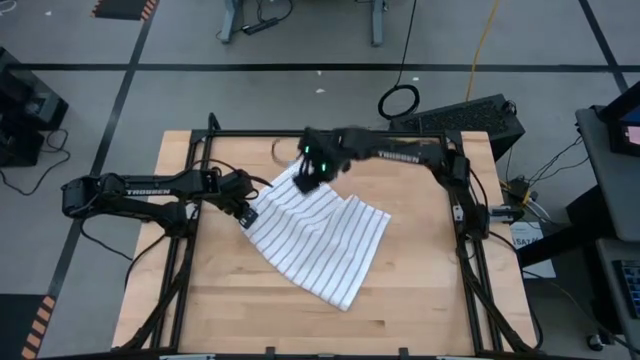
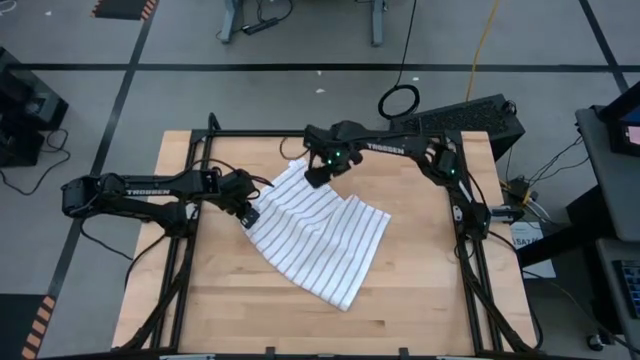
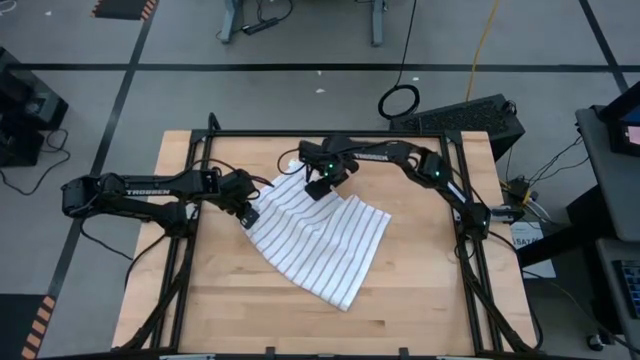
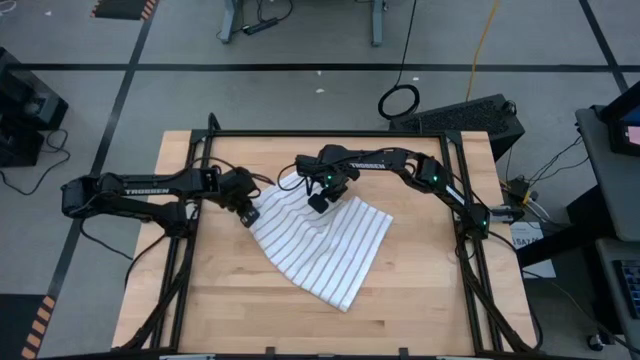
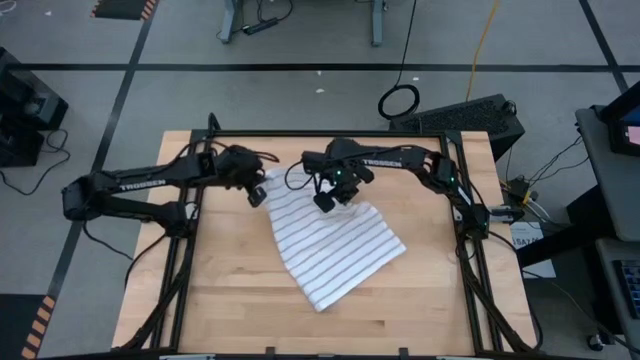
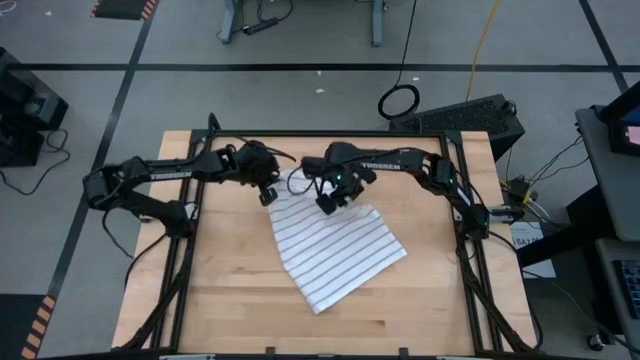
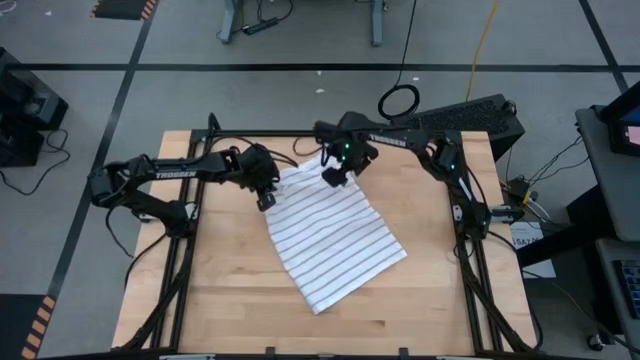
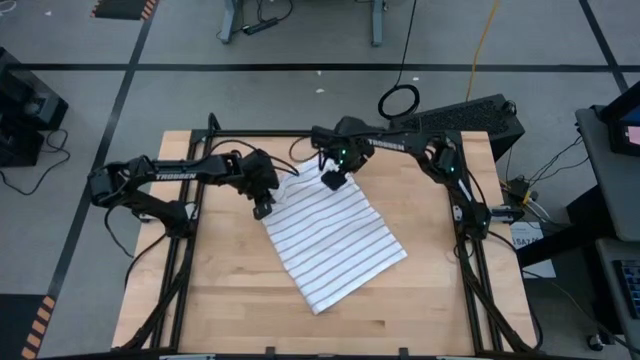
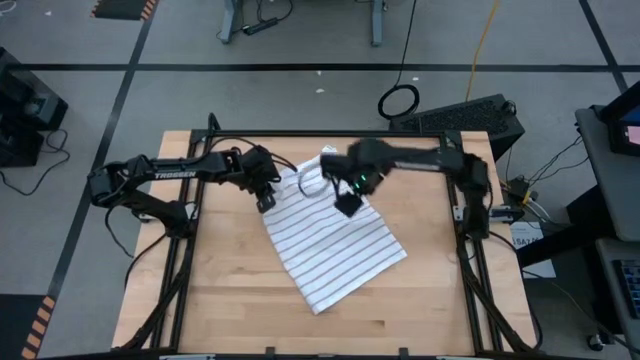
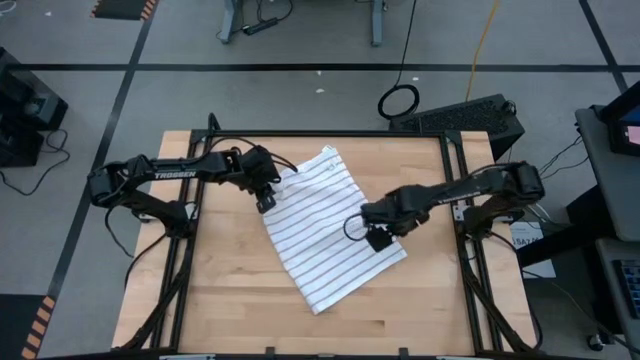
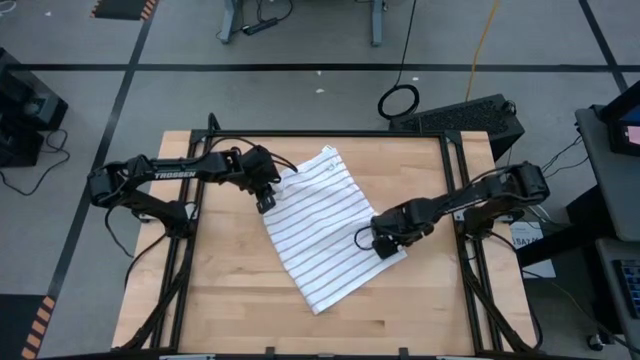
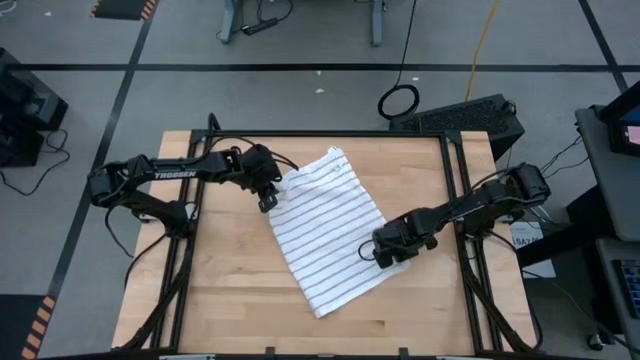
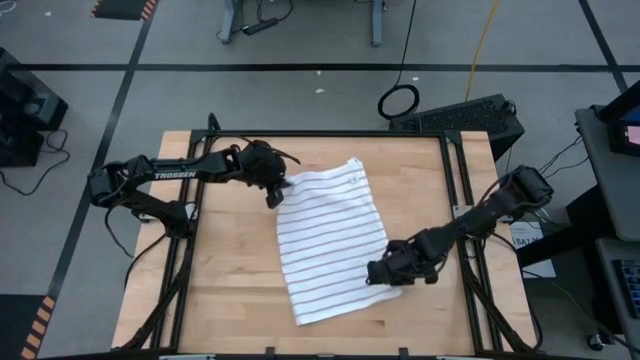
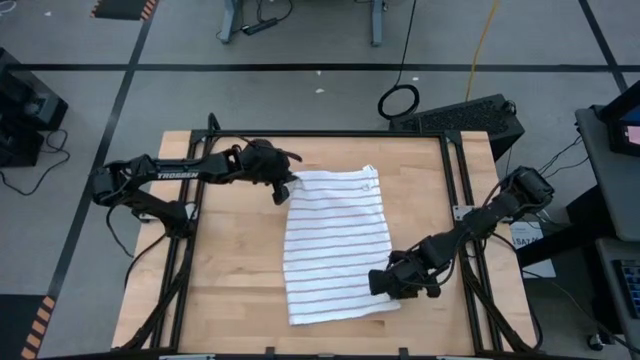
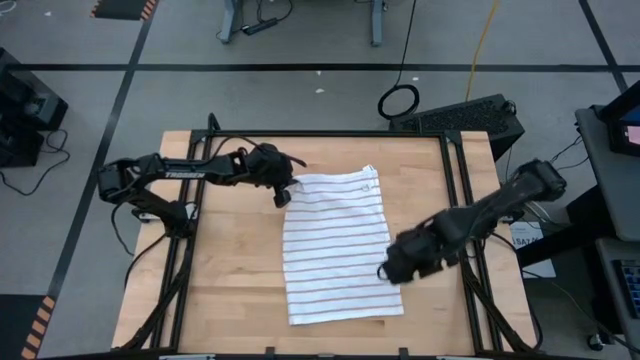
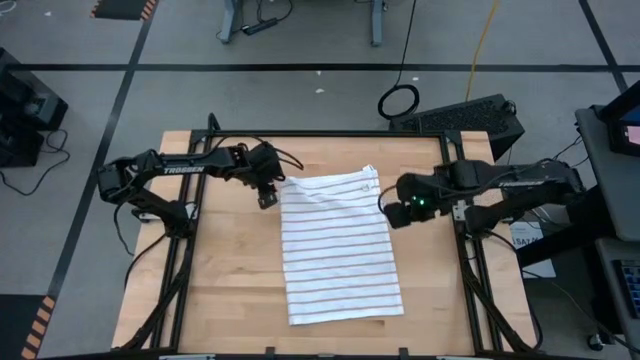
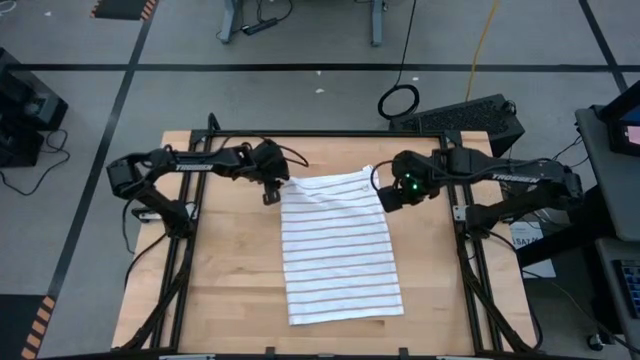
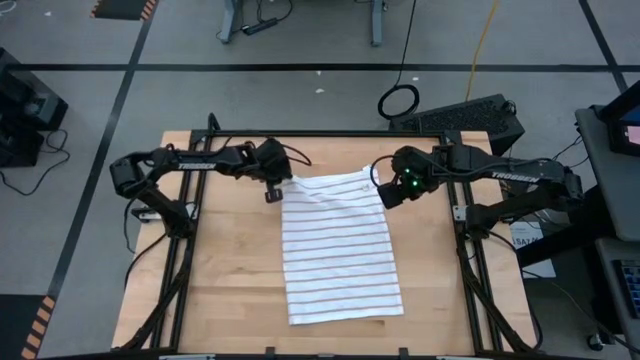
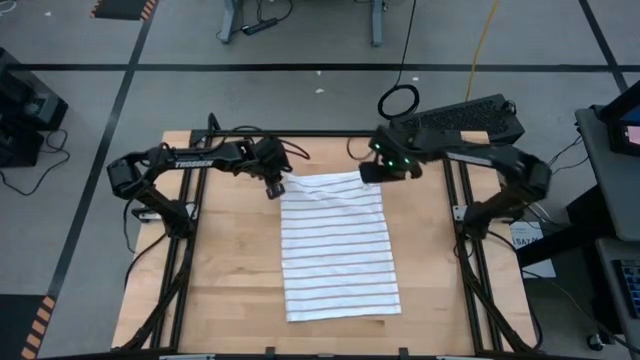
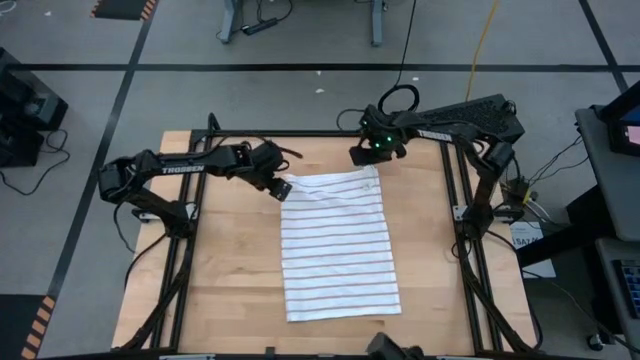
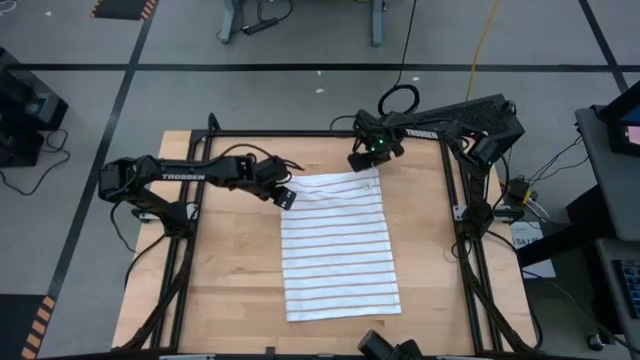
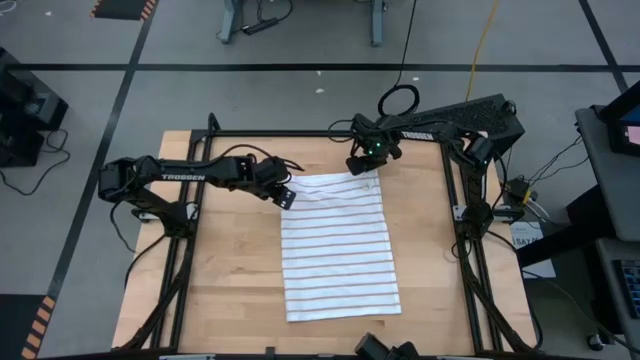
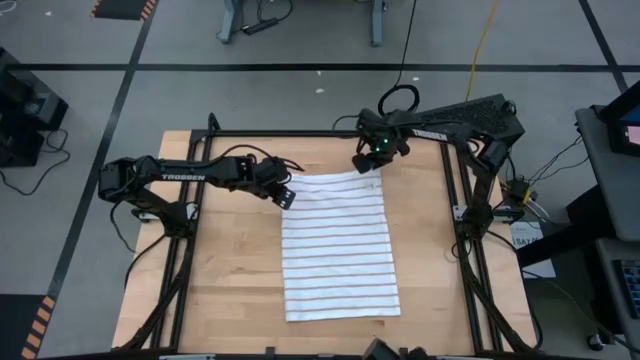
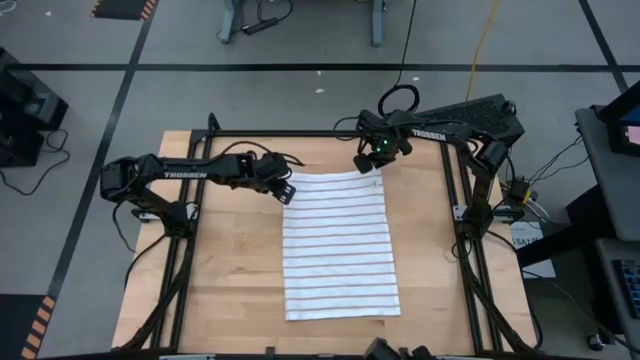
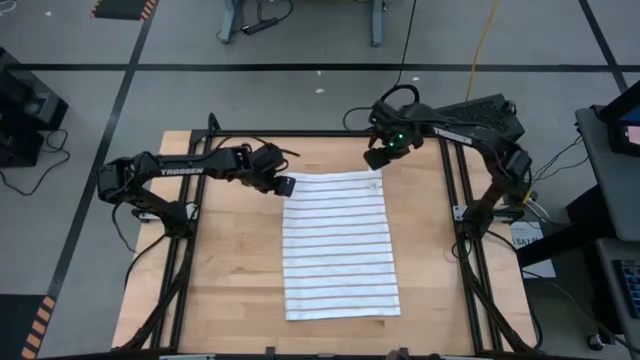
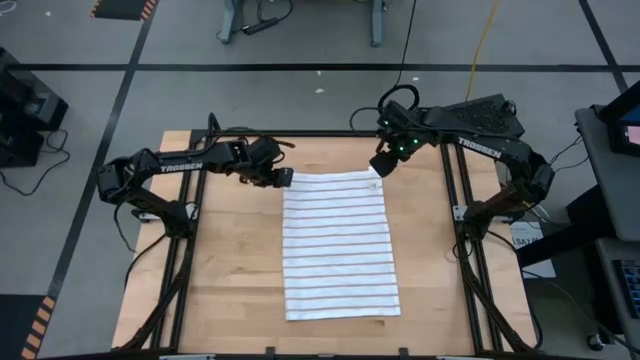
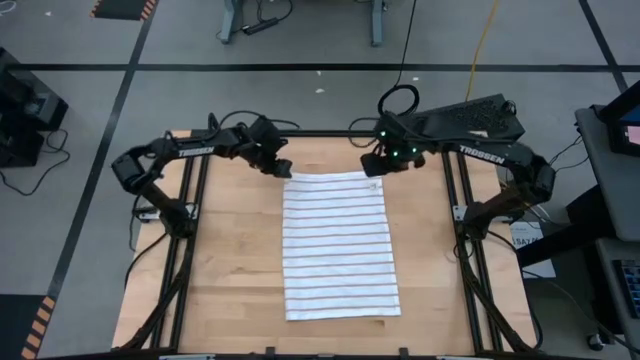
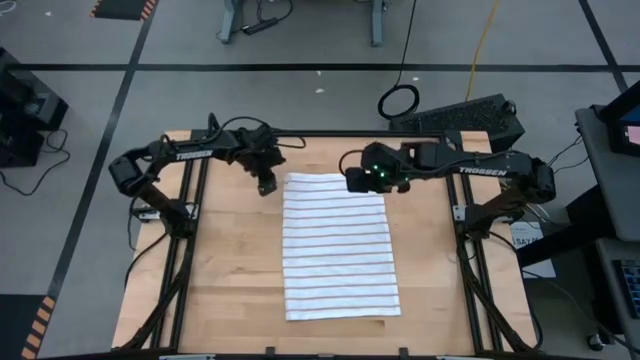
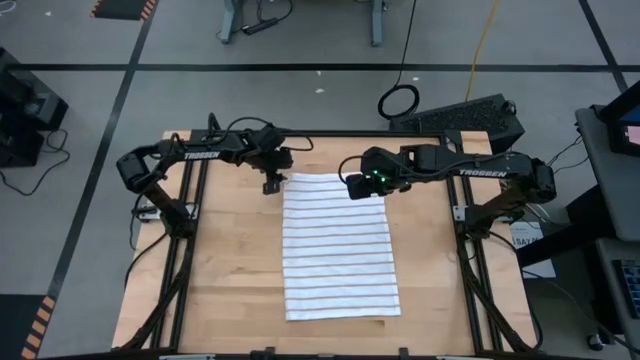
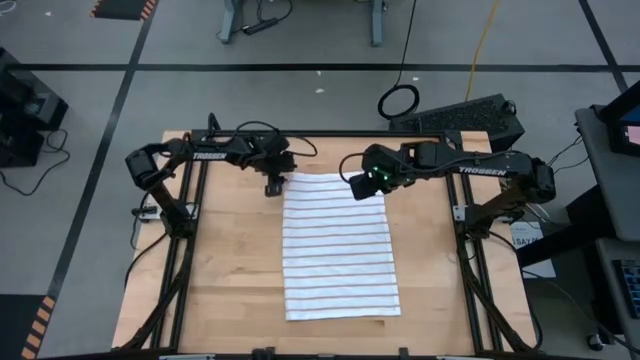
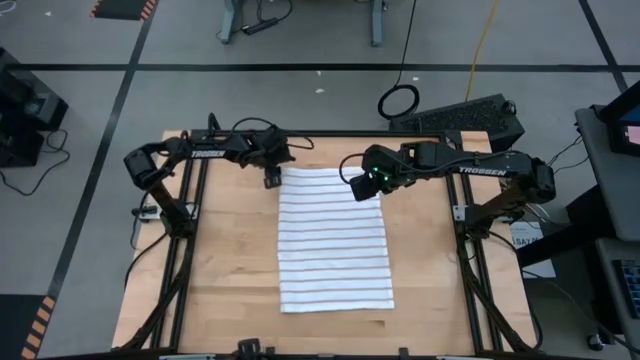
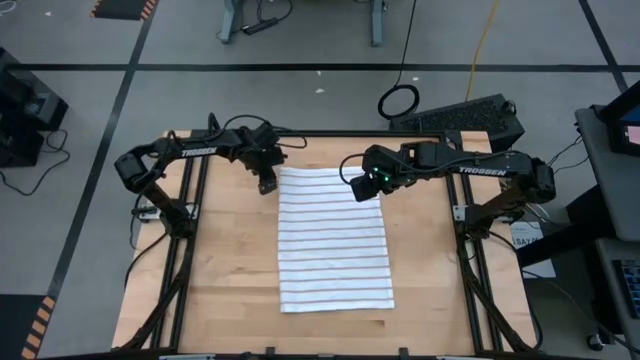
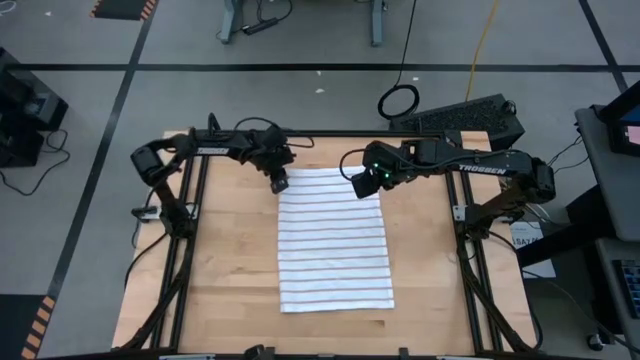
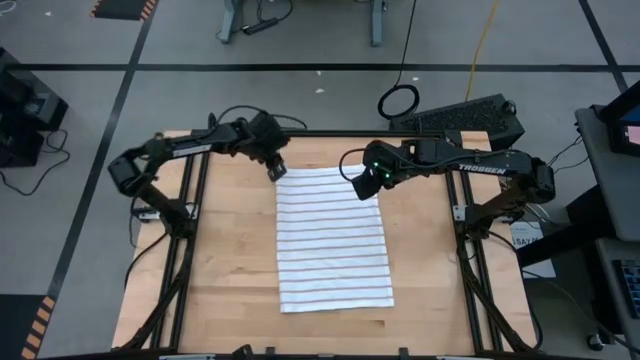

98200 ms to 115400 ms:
Task: Roll towel
Roll the white towel

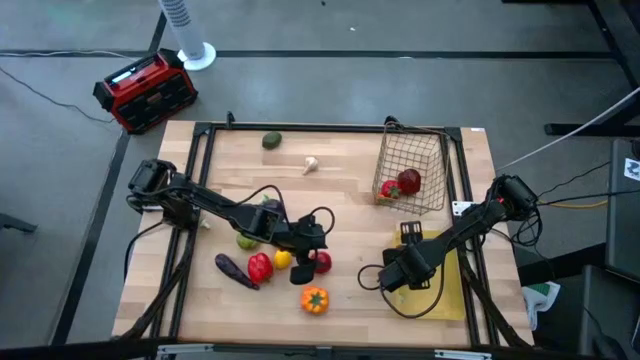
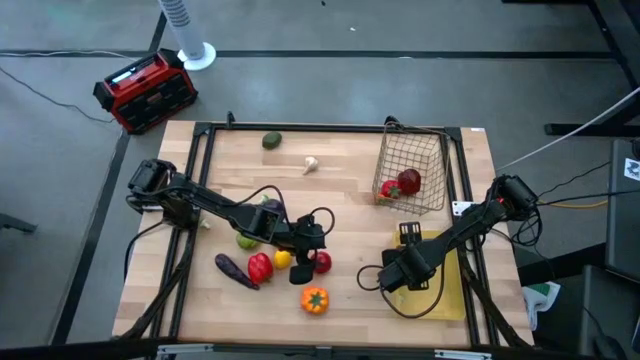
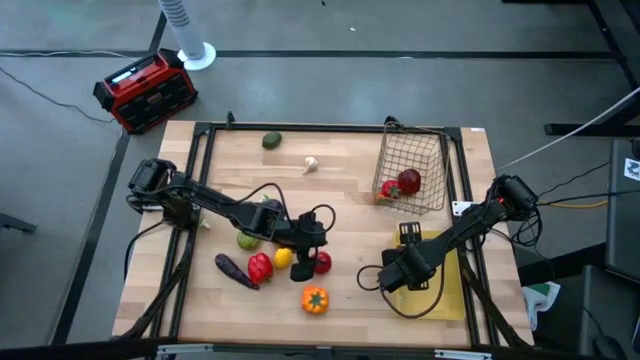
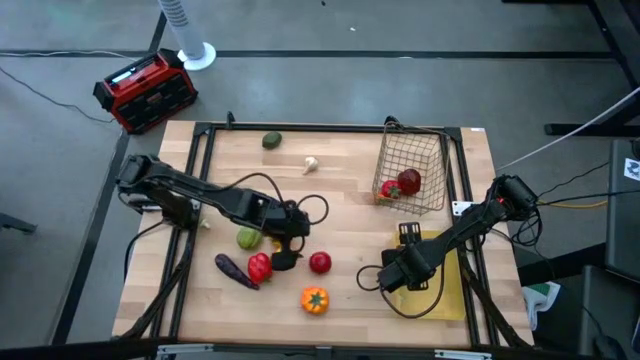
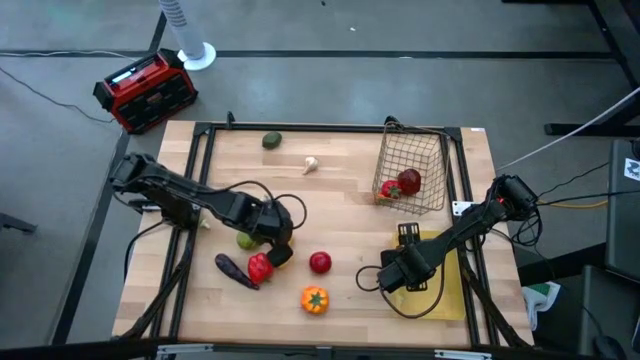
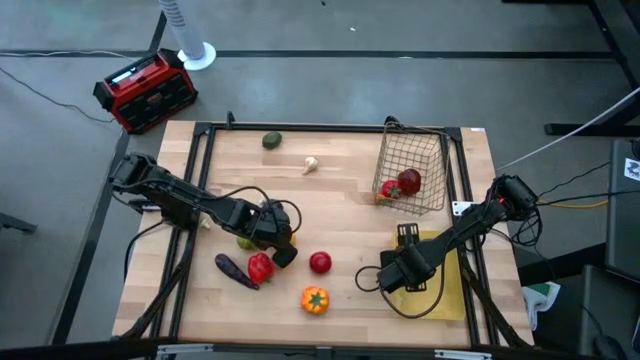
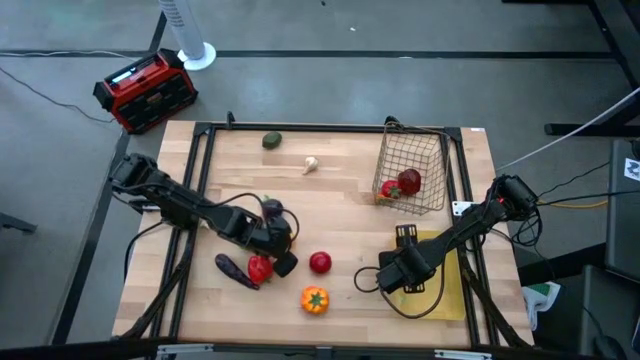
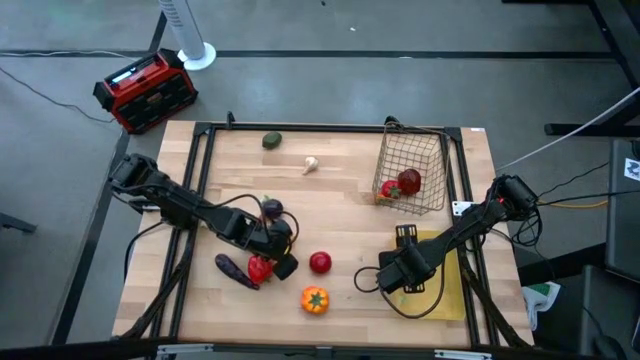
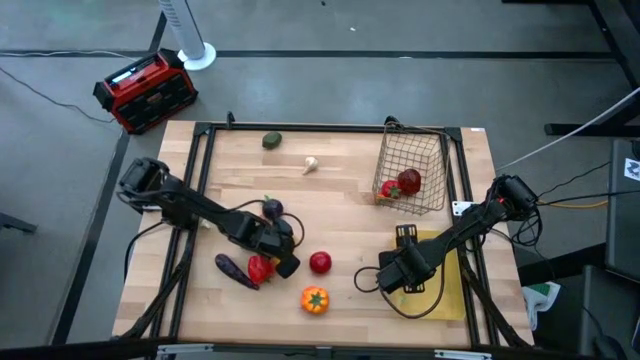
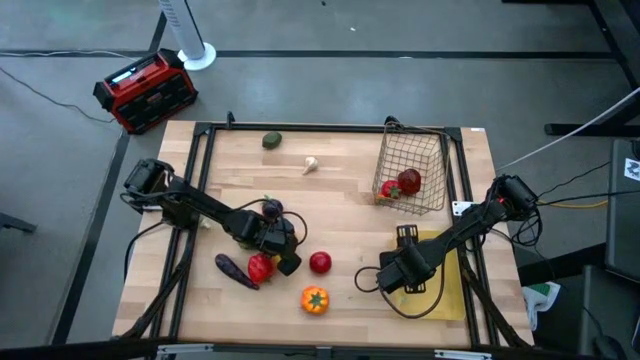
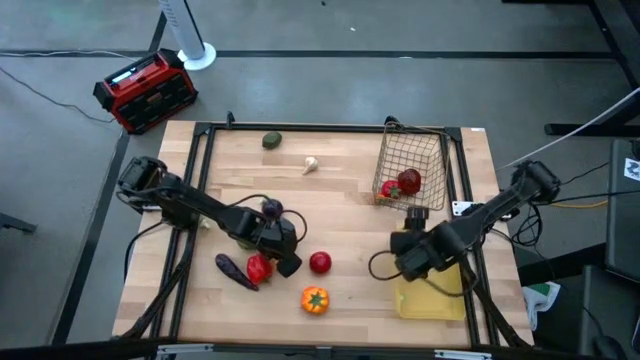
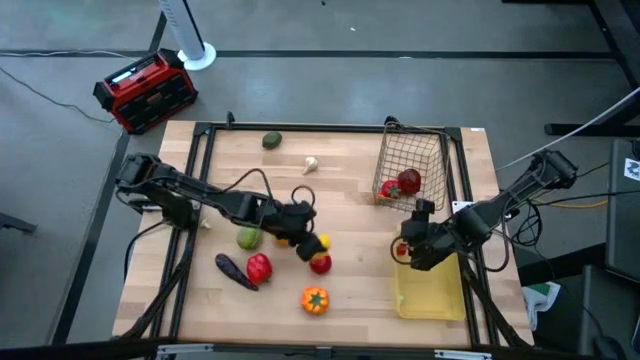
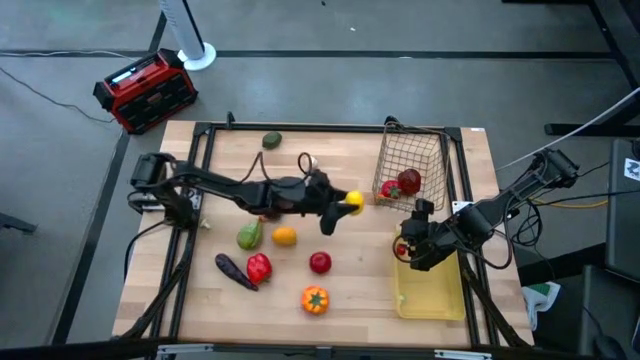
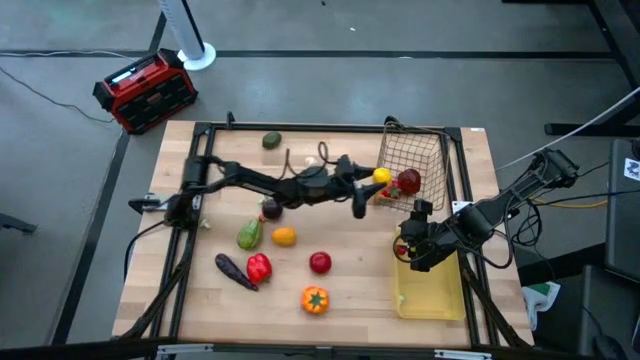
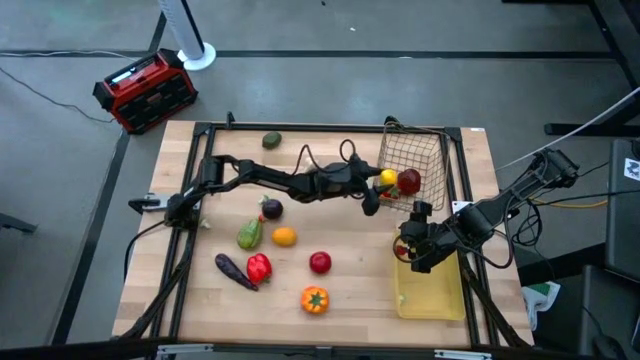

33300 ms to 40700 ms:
Task: Sort produce into baskets
Put the bottom yellow lemon into the wire basket
